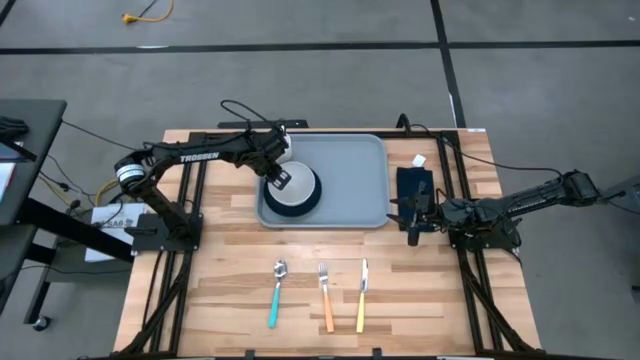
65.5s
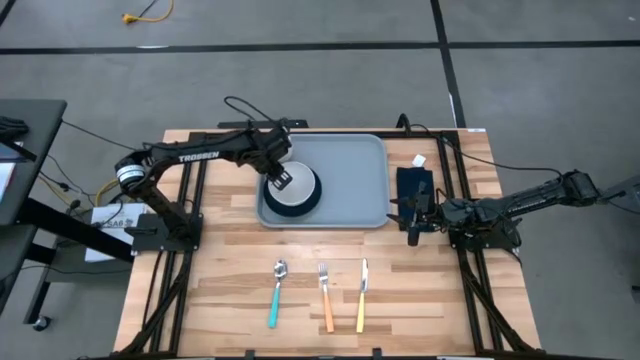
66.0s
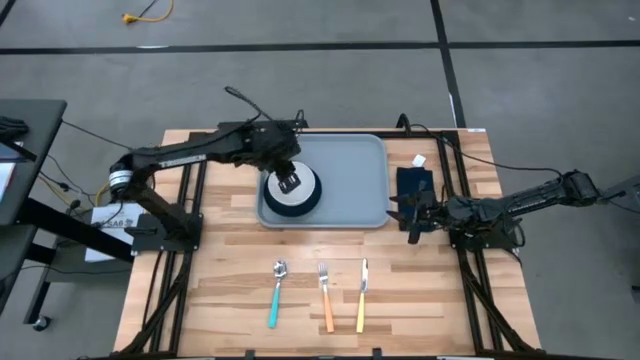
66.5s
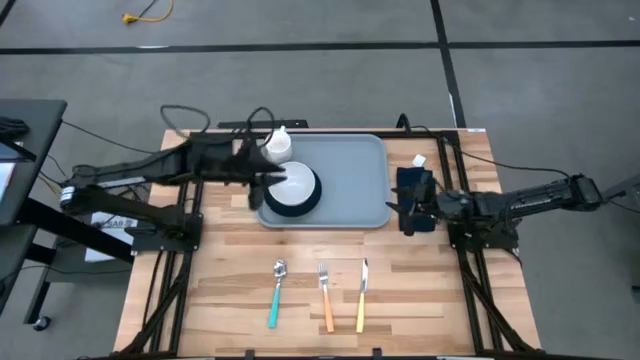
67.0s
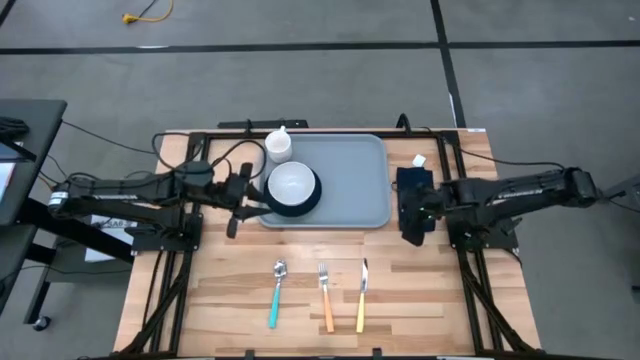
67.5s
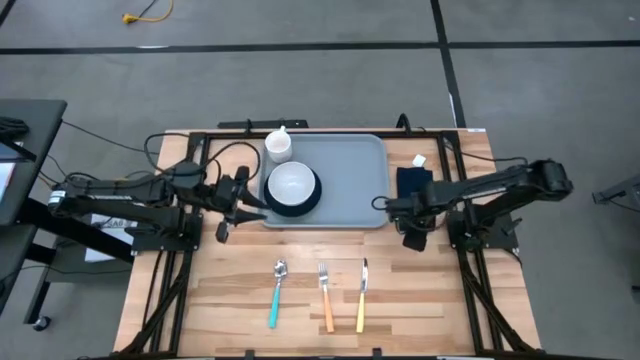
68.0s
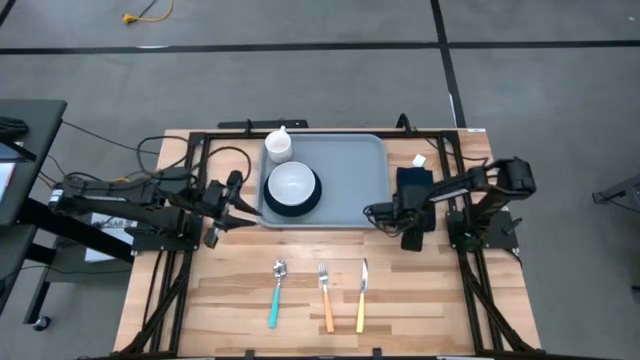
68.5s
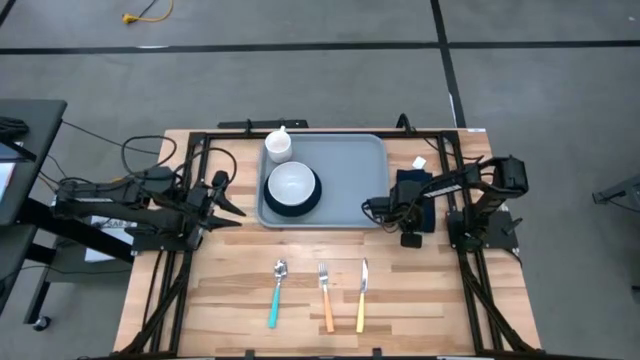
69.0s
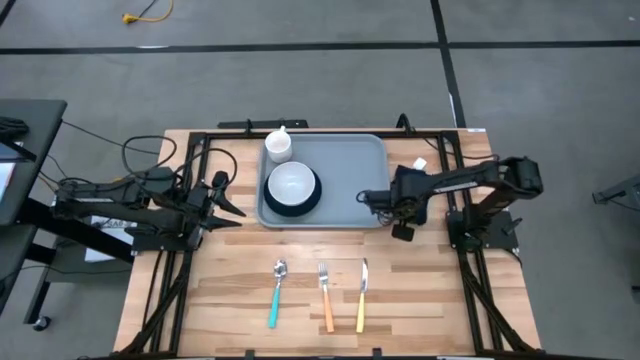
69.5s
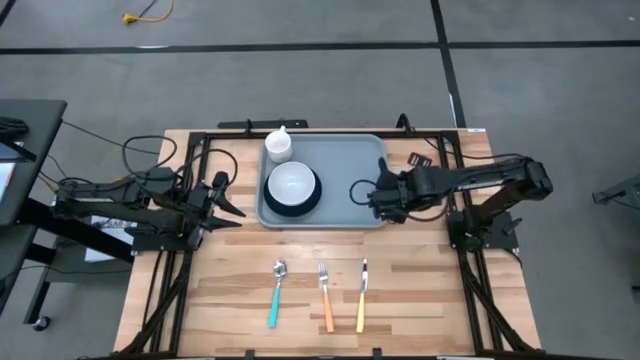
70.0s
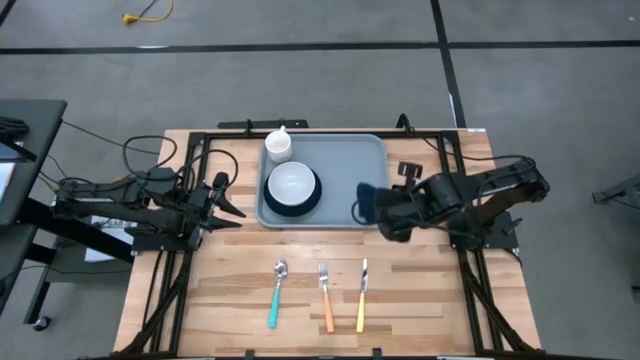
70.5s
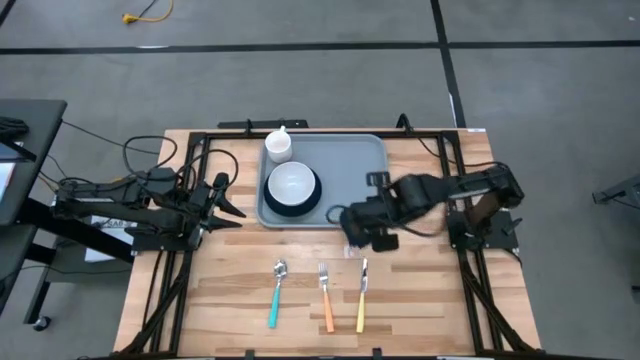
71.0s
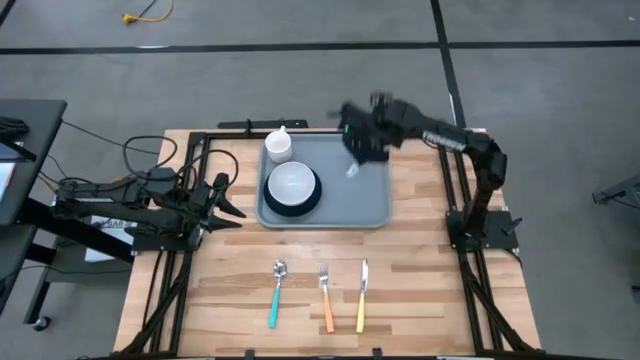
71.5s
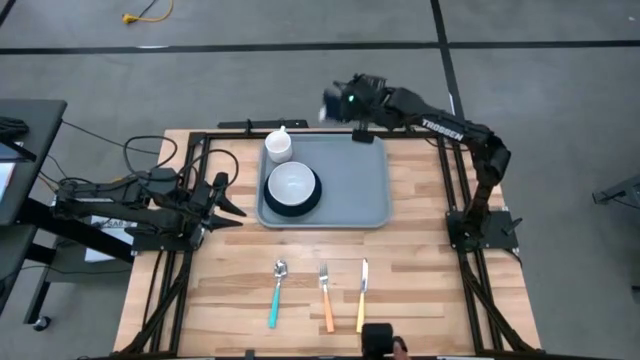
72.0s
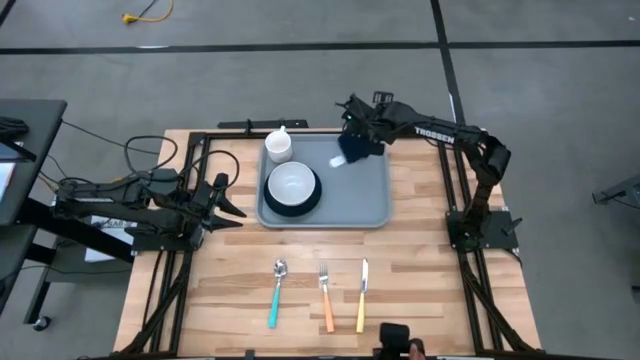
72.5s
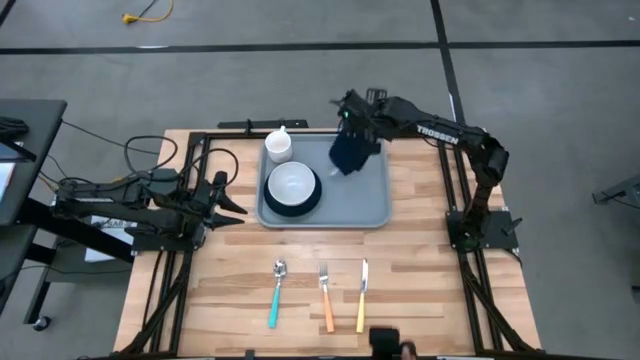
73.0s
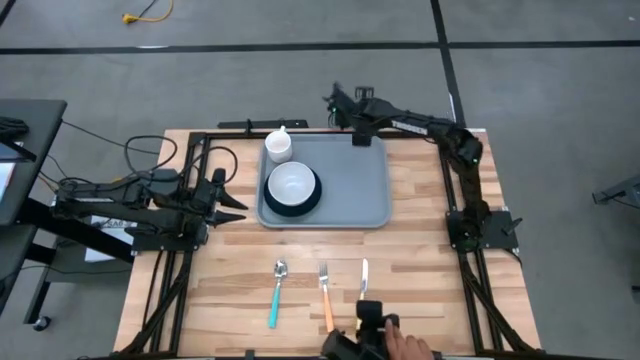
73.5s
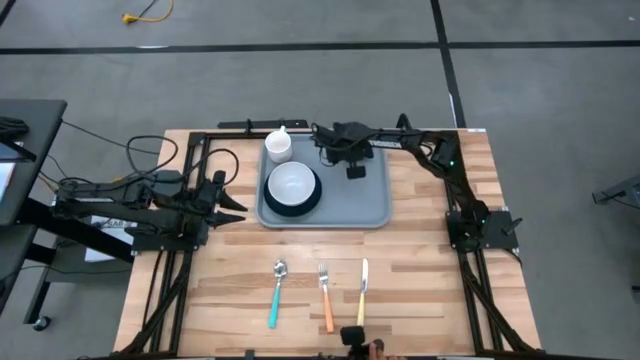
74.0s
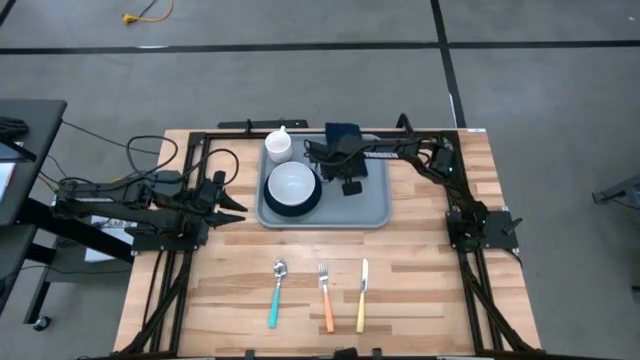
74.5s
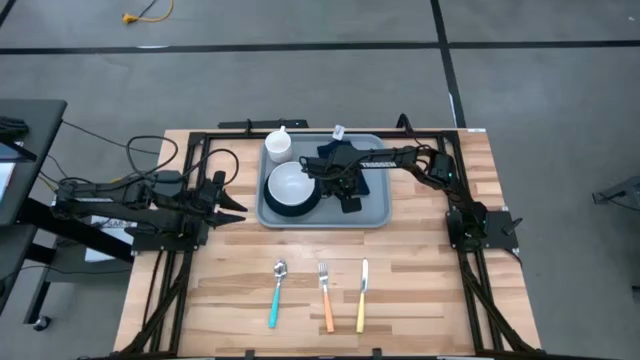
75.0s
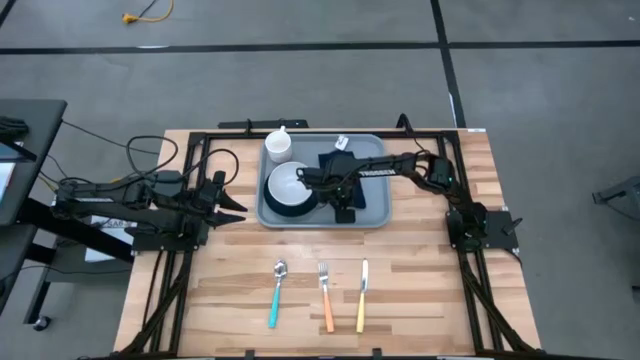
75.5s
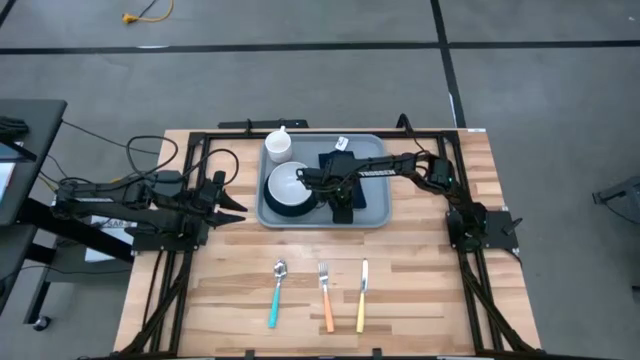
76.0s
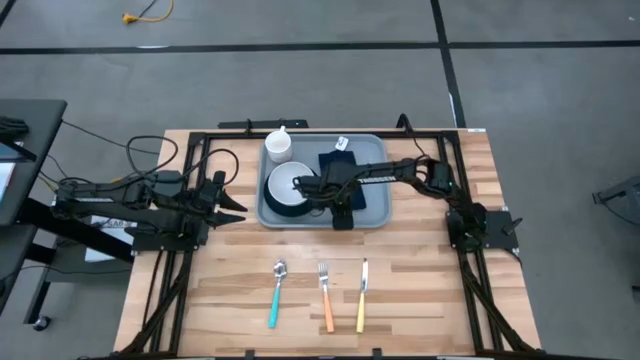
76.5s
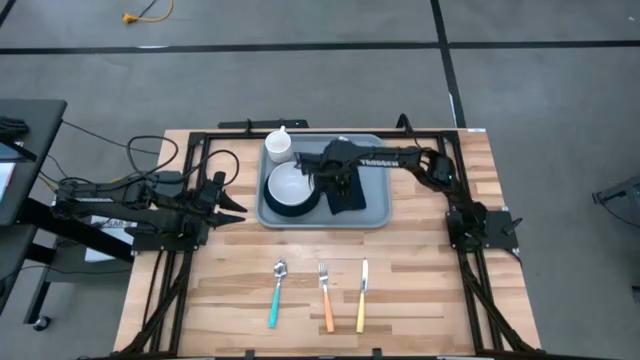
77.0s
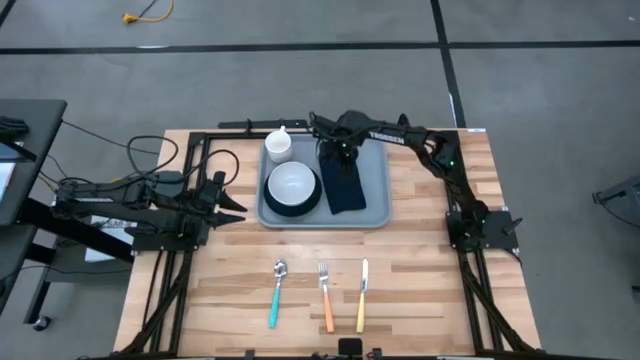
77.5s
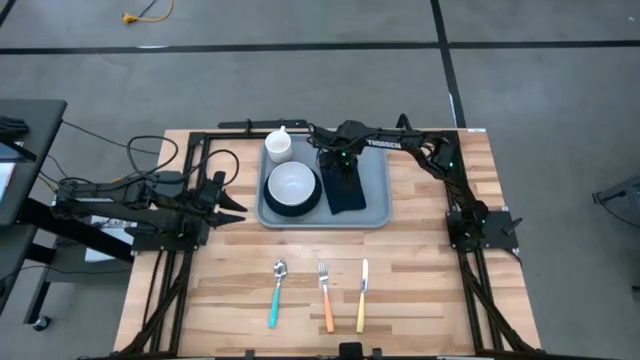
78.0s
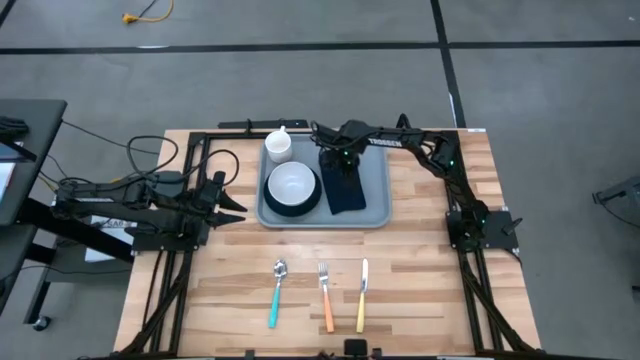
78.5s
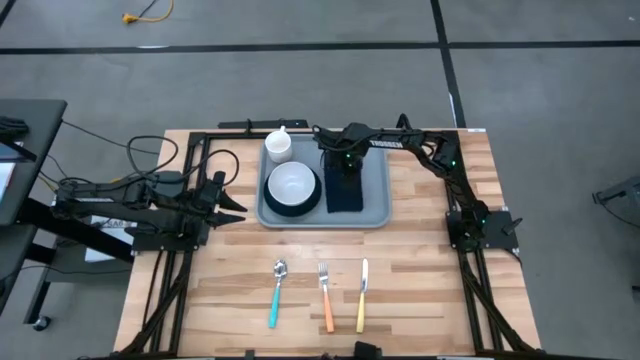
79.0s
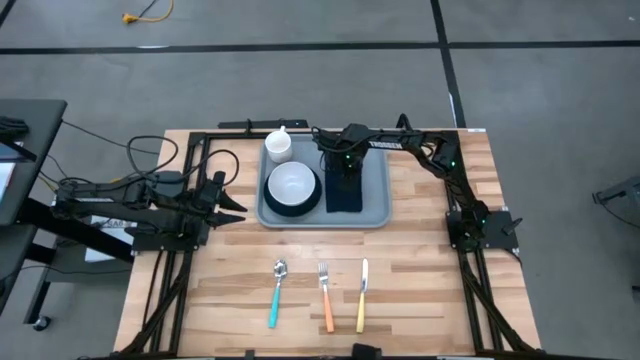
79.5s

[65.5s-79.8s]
Task: Set up tray
Put the dark blue napkin on the gray serving tray to the right of the black plate

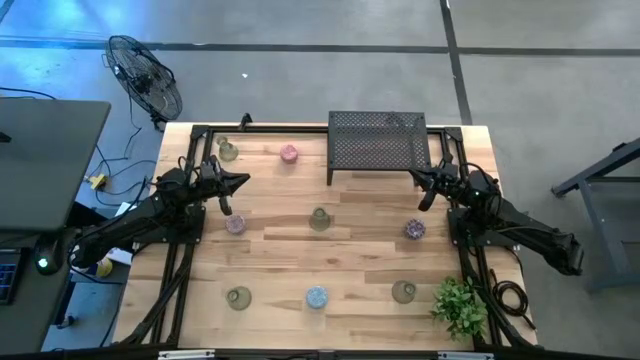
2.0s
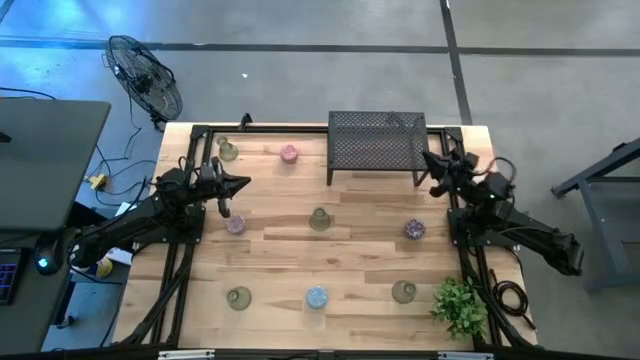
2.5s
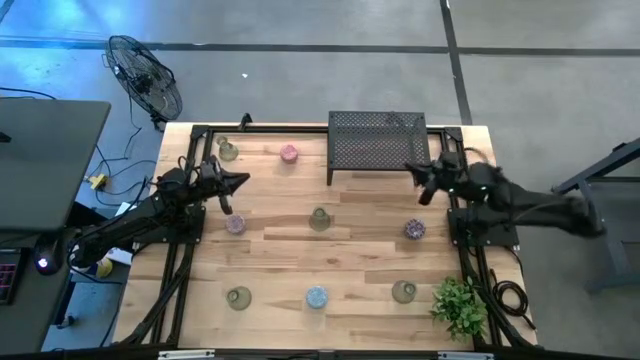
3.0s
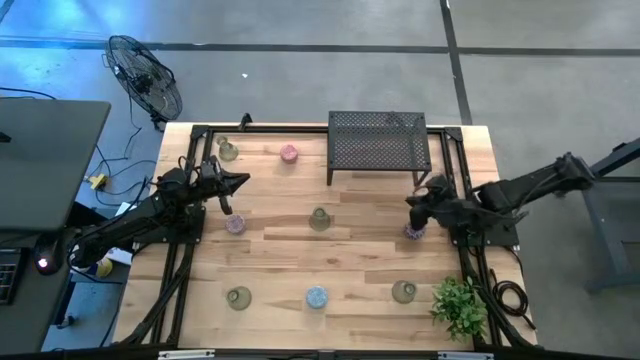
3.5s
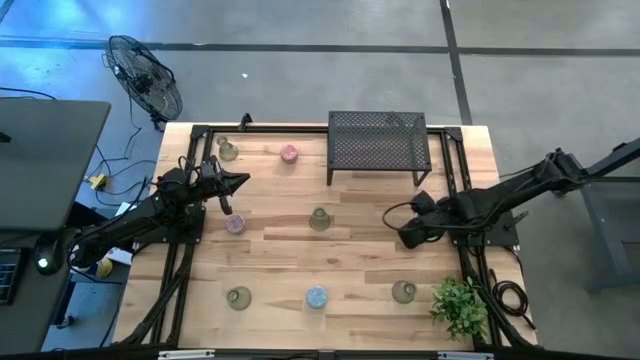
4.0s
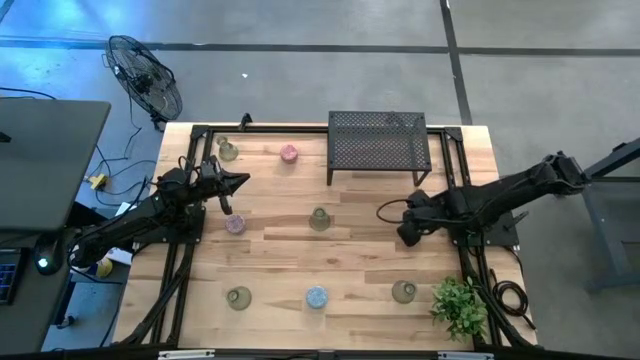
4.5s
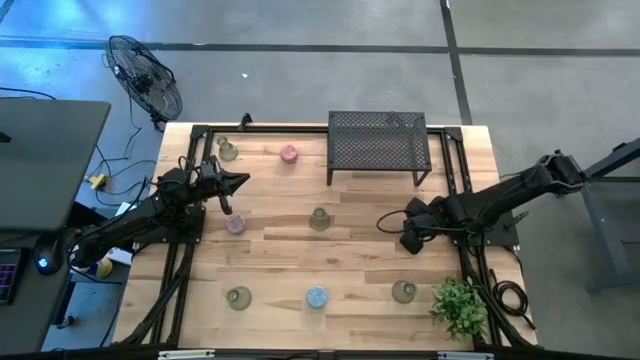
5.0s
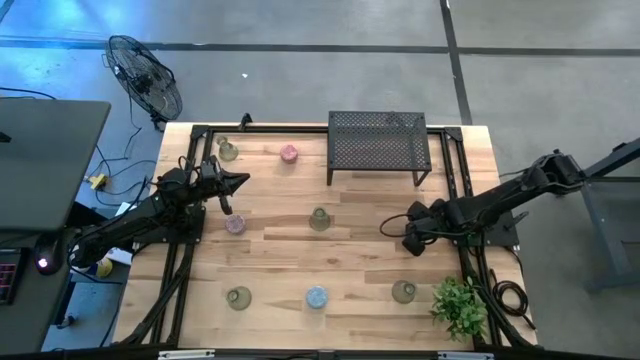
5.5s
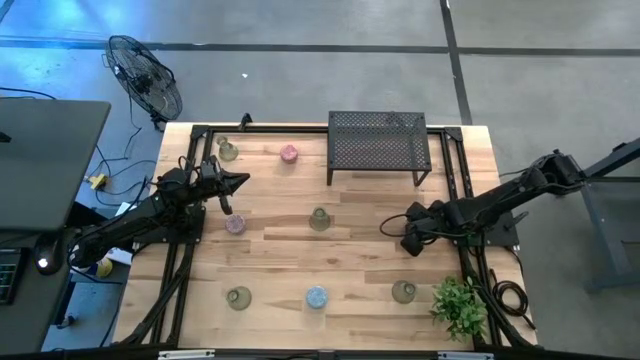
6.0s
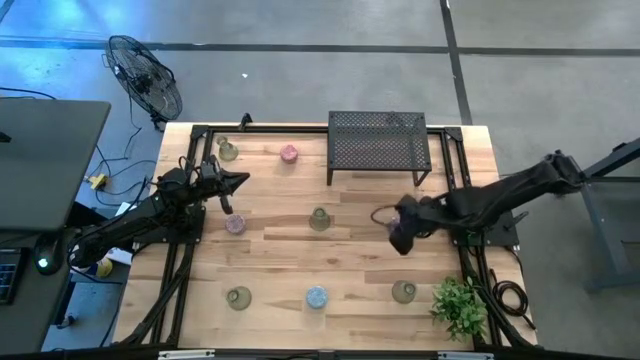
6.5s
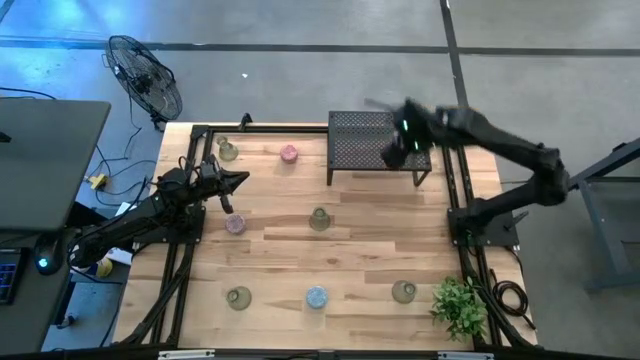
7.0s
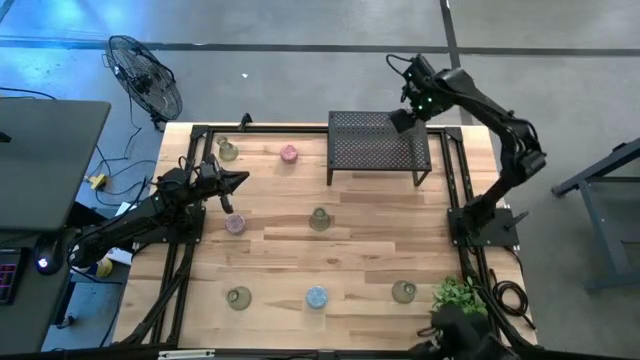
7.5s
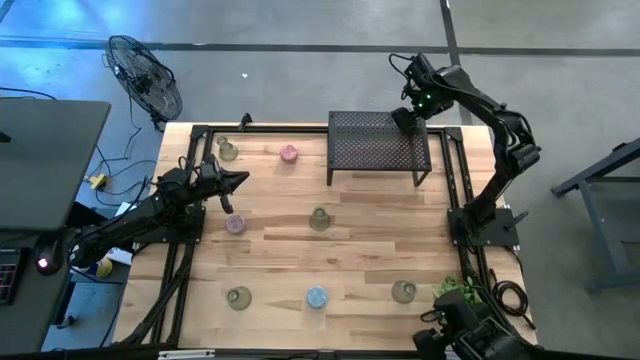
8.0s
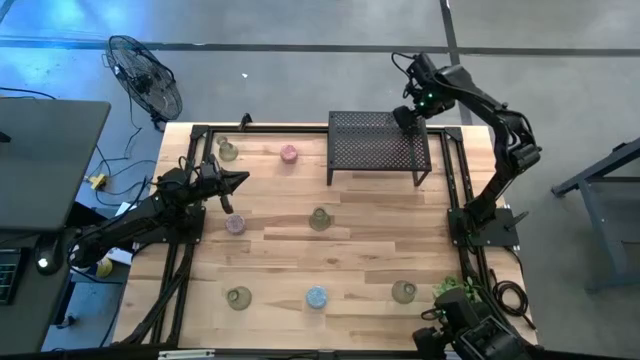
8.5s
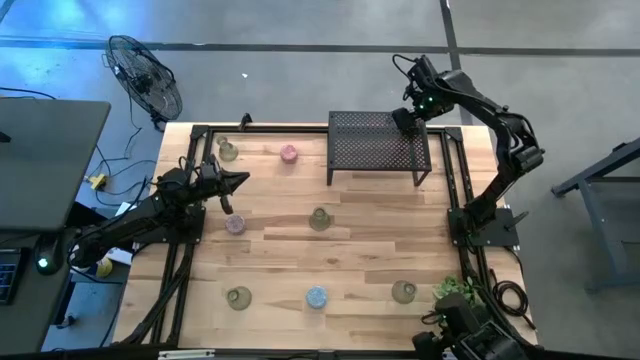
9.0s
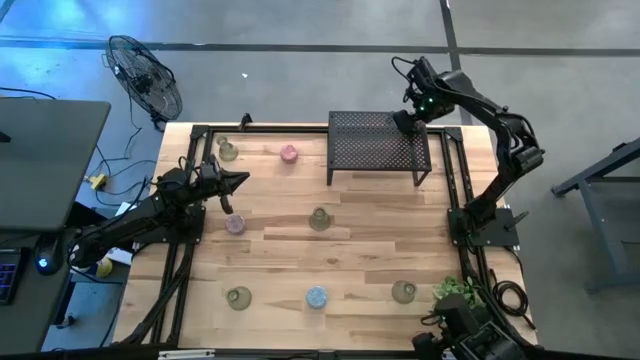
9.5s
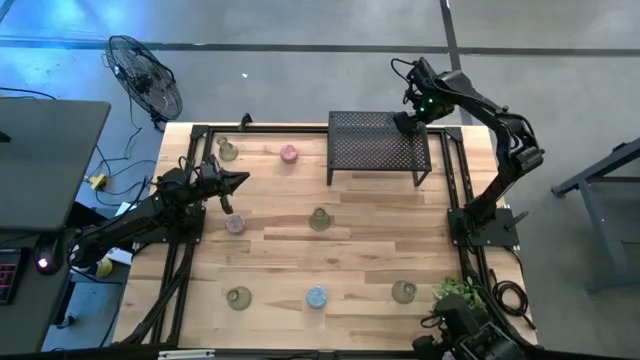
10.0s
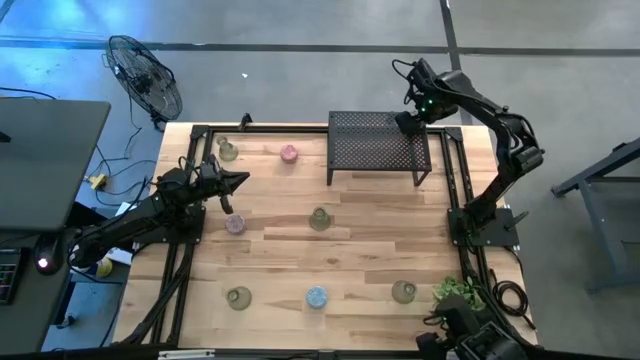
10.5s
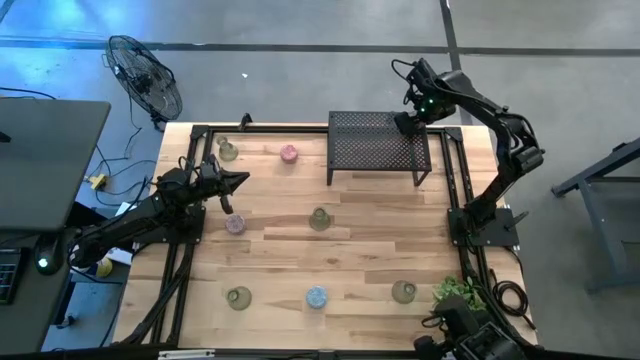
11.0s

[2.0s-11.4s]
Task: Pick & Place candle stick holders
Put the black and red scented candle on the shelf
